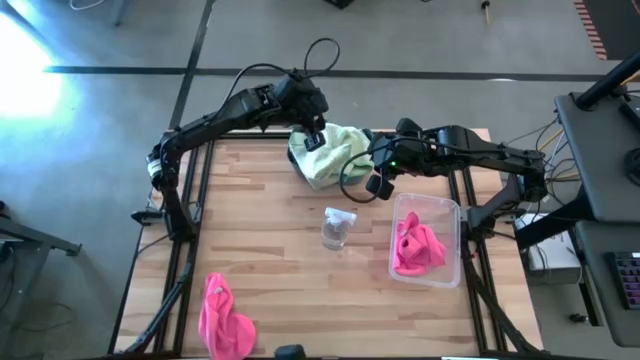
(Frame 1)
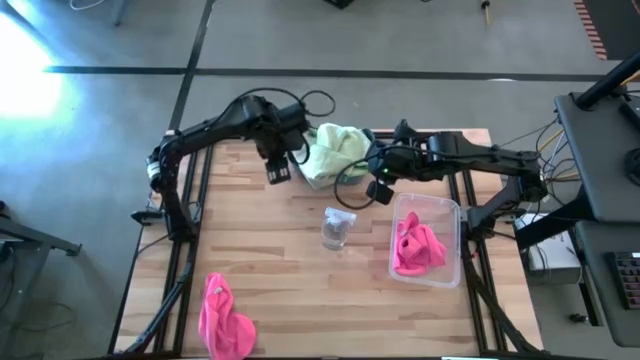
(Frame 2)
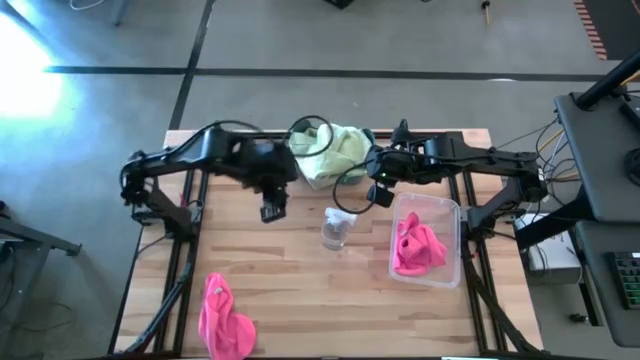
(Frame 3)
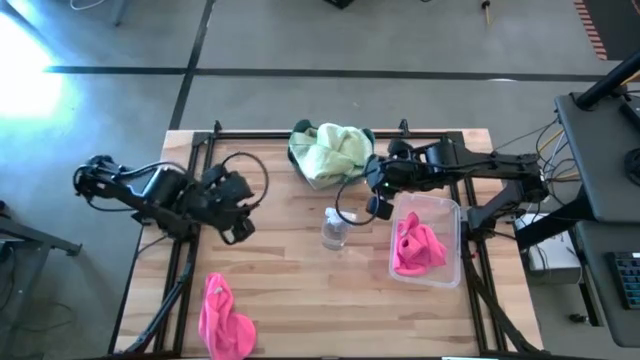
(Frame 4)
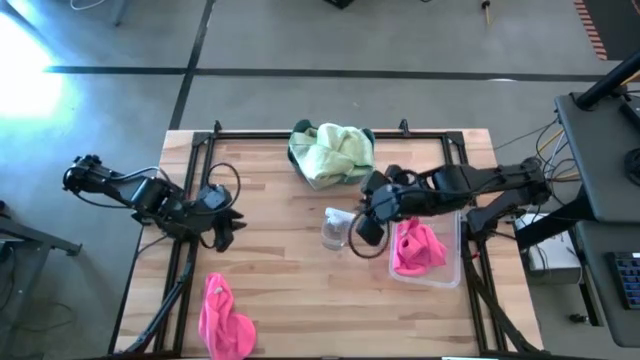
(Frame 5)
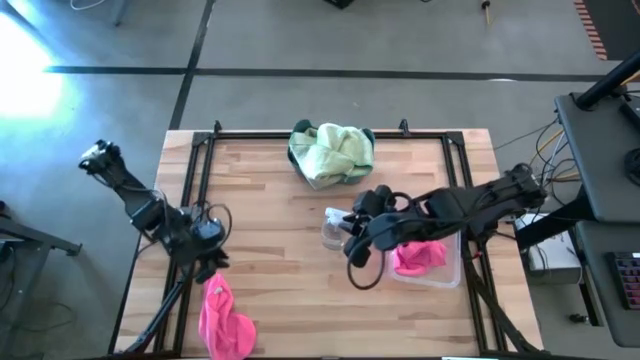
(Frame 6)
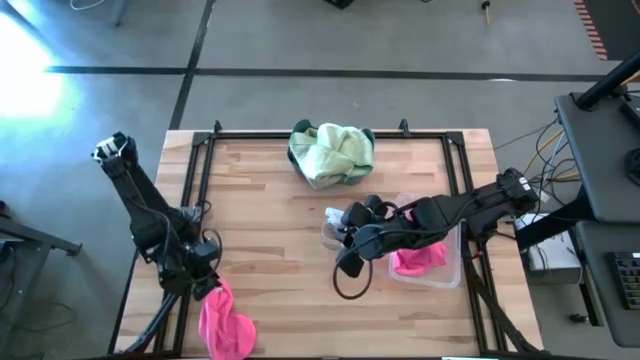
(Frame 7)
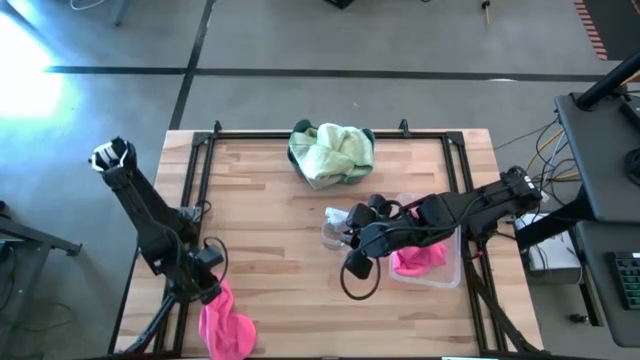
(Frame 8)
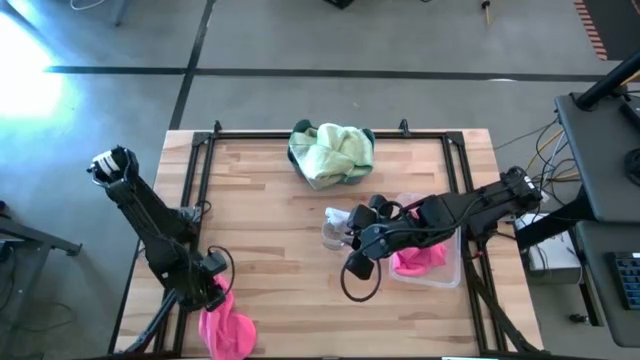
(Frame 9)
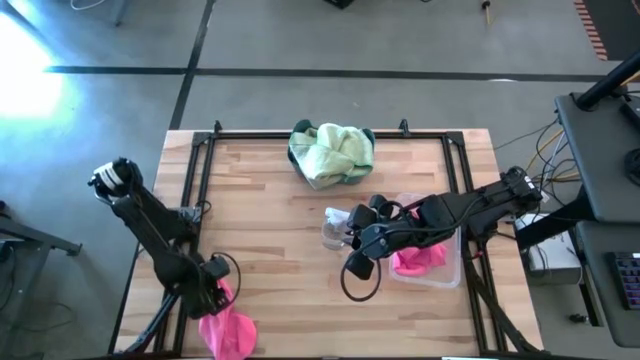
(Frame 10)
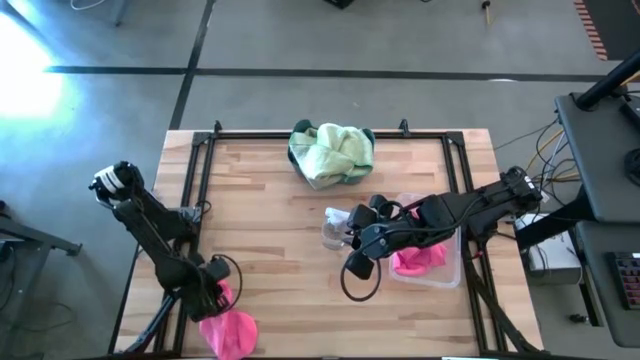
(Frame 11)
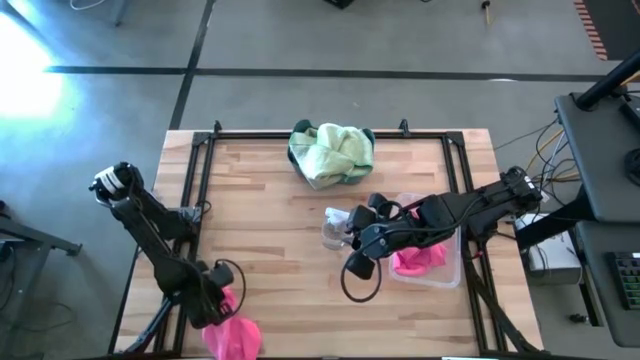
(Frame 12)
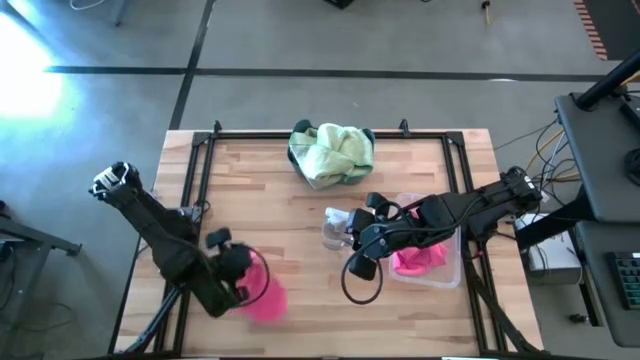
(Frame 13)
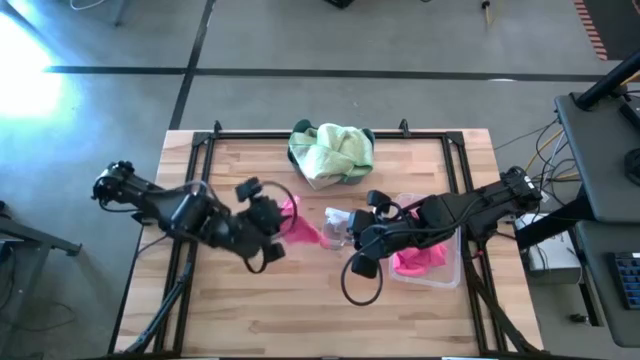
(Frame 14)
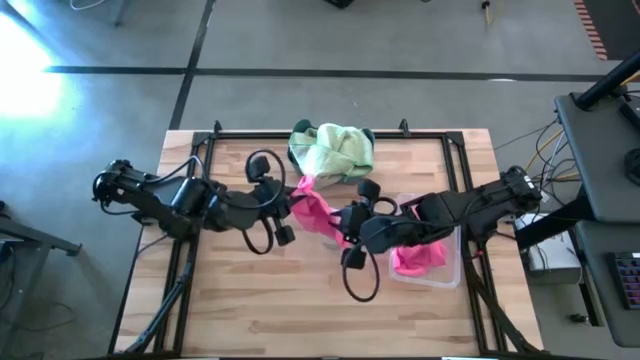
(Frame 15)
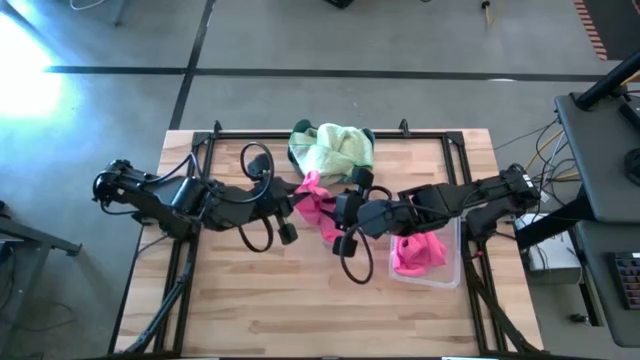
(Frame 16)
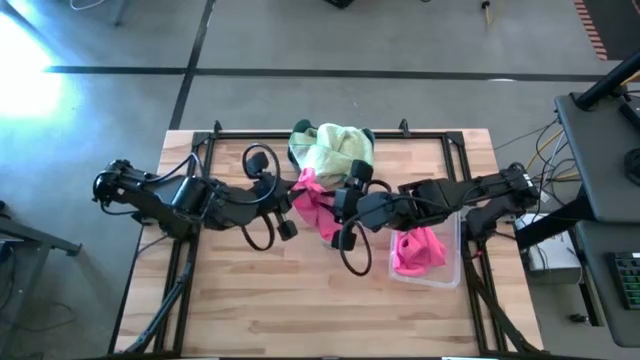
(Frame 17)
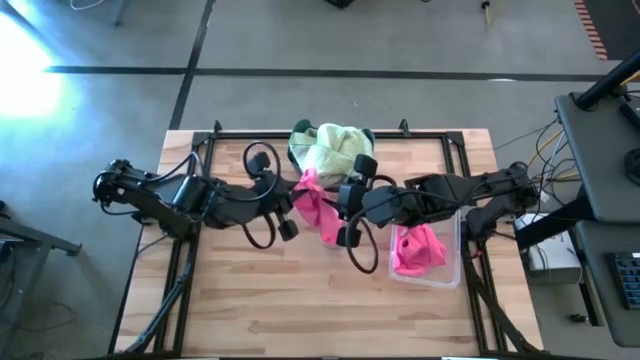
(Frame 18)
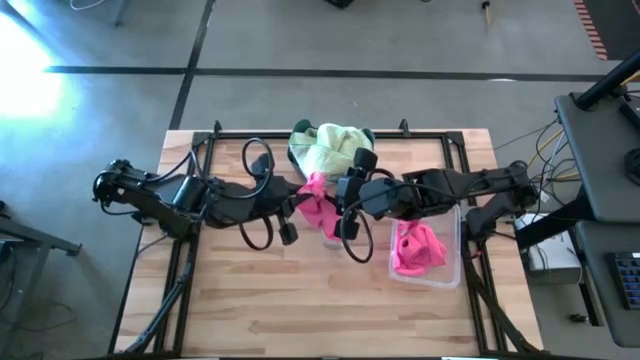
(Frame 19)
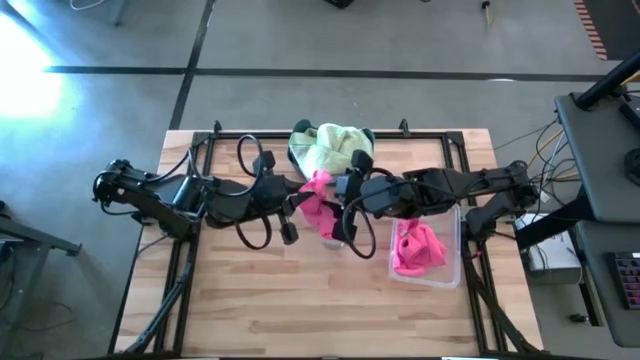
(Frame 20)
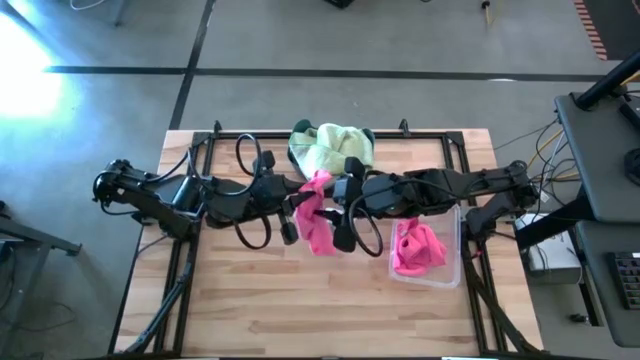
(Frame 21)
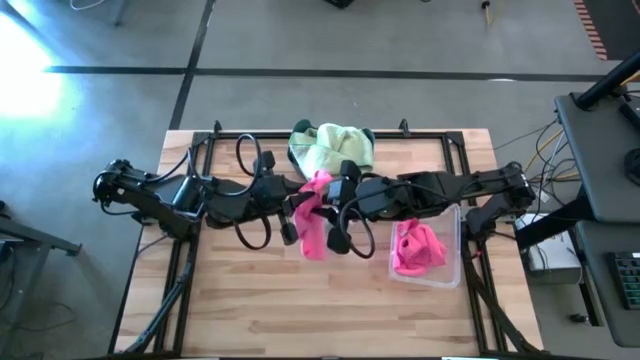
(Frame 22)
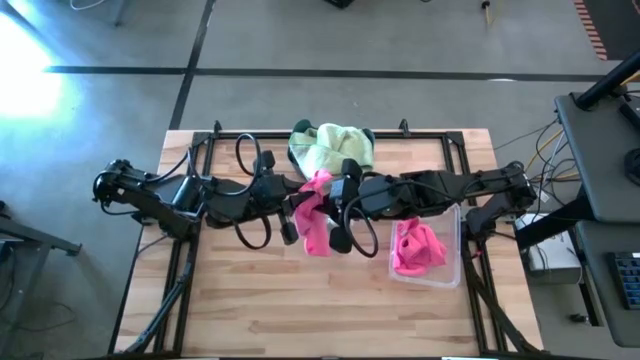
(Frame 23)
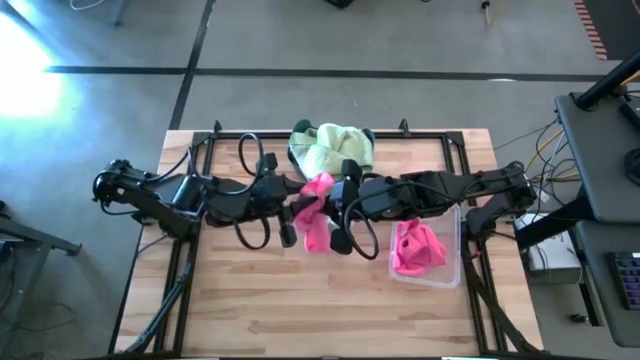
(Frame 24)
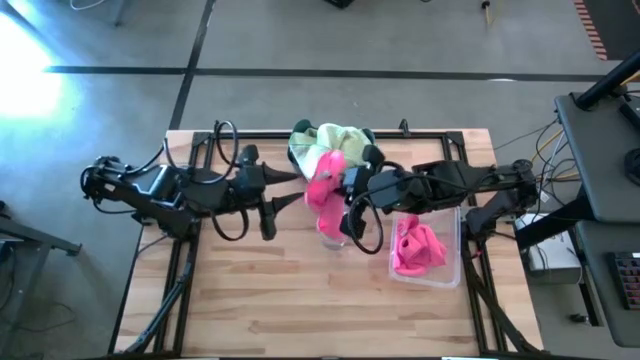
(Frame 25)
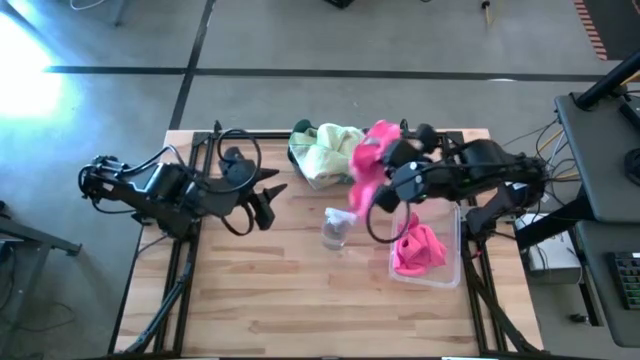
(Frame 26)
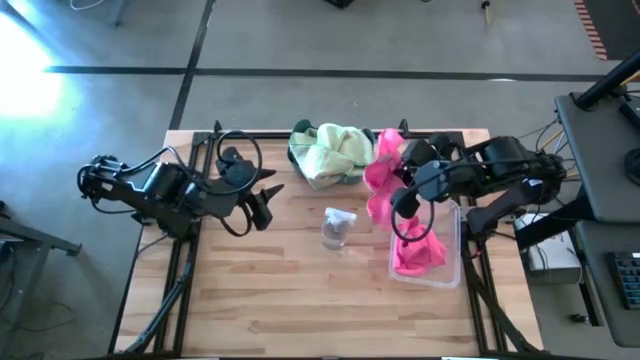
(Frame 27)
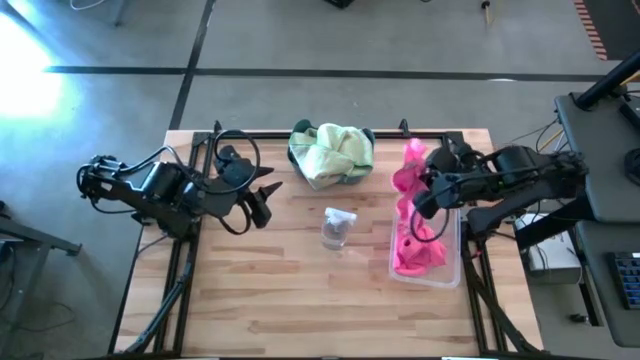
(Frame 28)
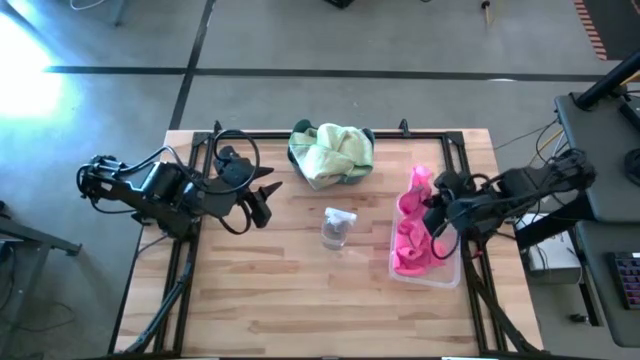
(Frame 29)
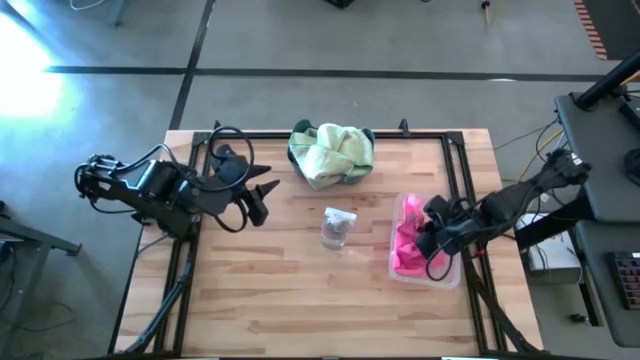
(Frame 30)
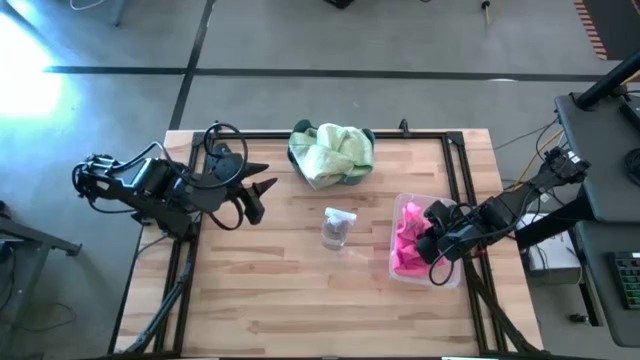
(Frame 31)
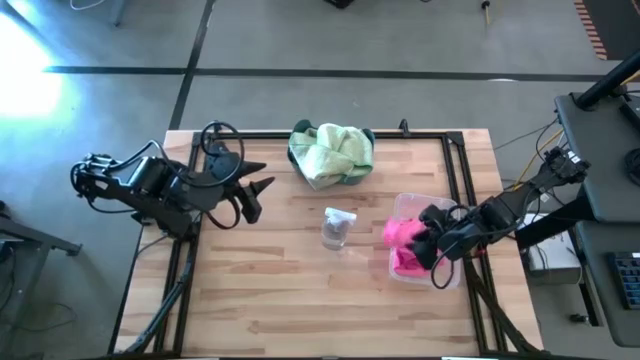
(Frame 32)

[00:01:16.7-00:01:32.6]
Task: Sort microfiber towel by color & place in baskets
Put the pink microfiber towel into the transparent bin

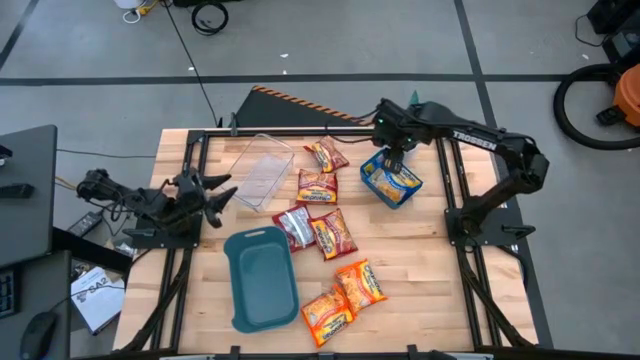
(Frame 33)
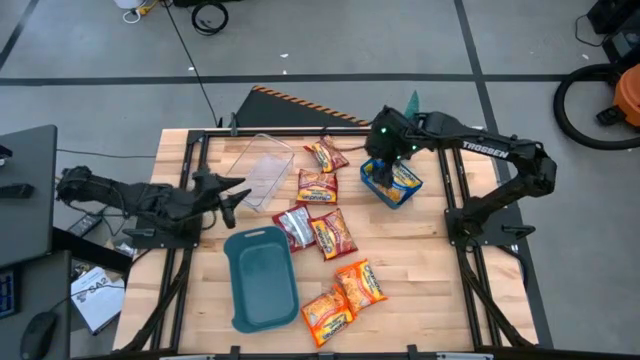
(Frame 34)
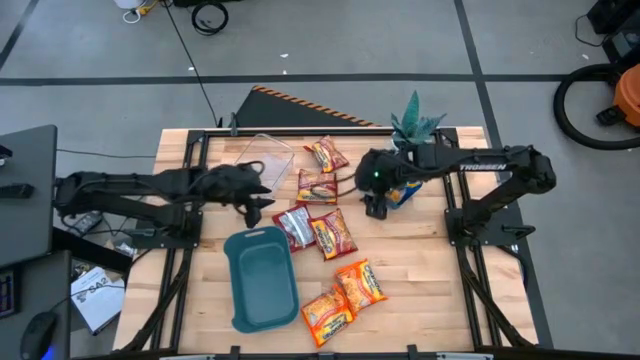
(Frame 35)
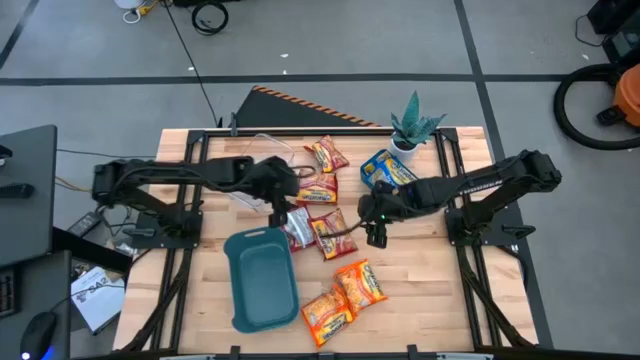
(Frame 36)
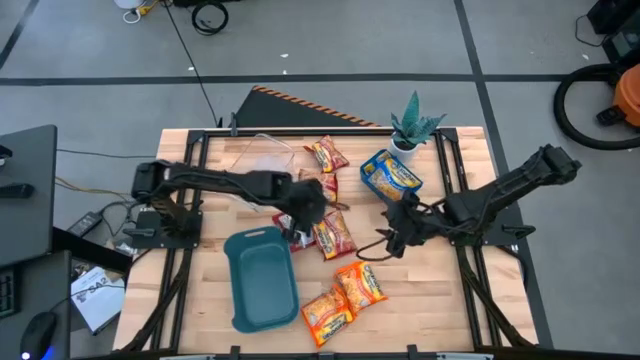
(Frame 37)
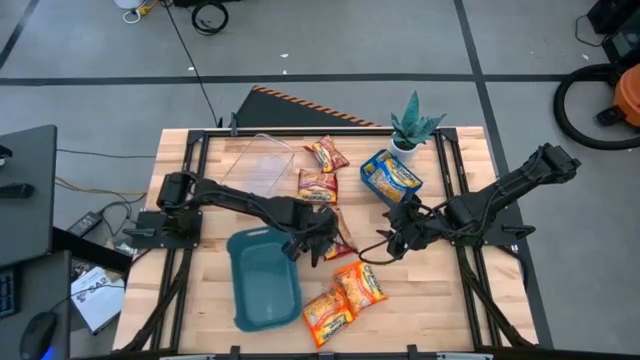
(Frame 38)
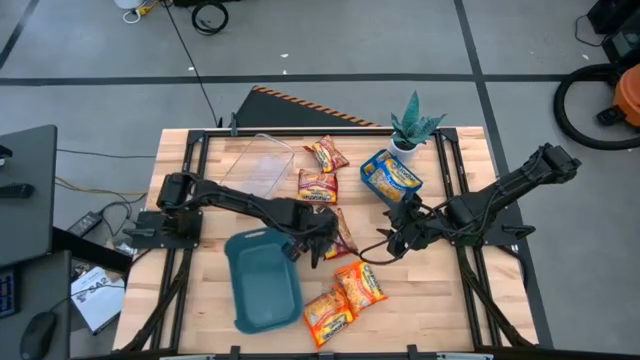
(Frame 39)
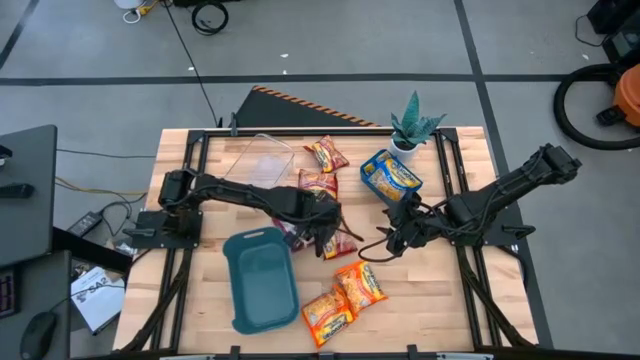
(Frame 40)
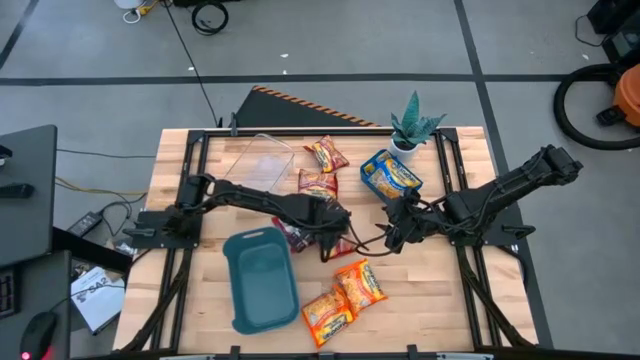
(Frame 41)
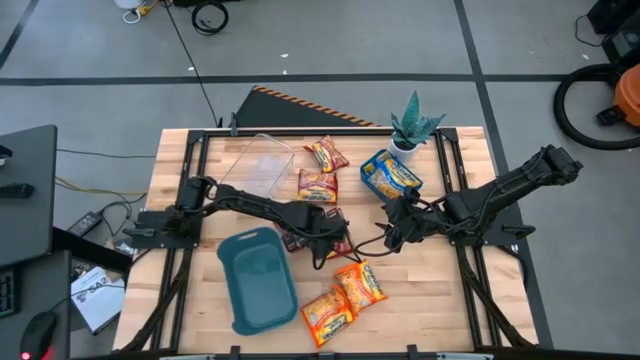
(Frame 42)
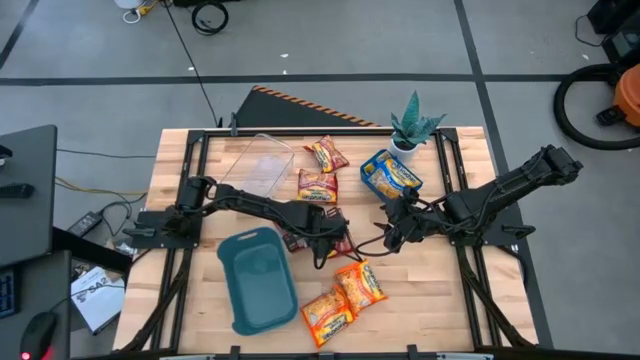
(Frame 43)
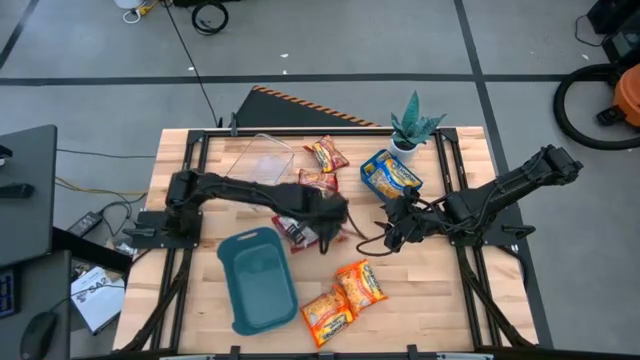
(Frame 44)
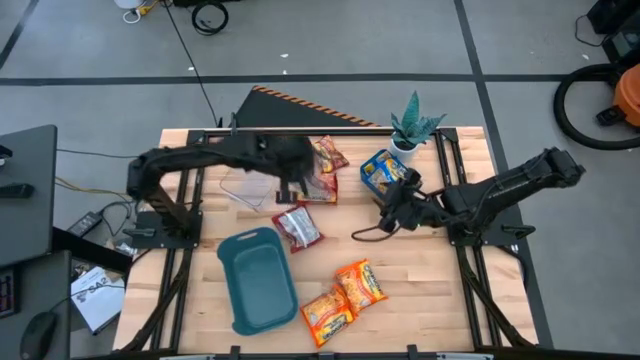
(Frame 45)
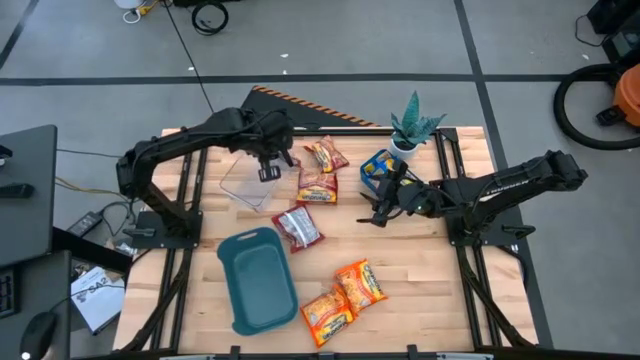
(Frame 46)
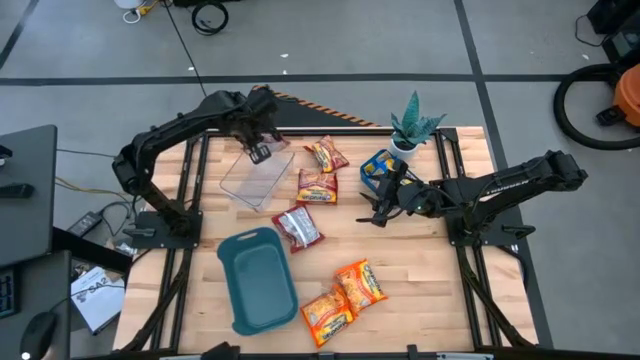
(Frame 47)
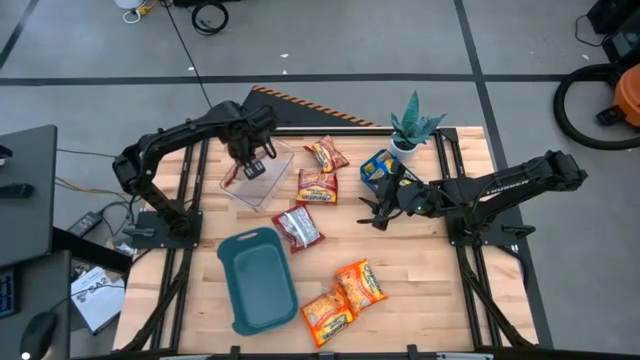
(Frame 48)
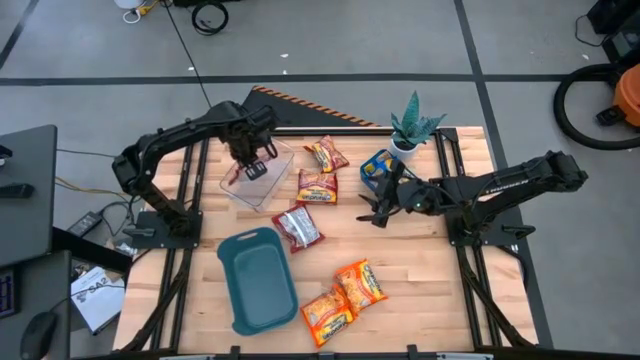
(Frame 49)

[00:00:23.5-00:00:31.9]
Task: Sort Maruchan noodles
Put the red noodle pack into the transparent bin
